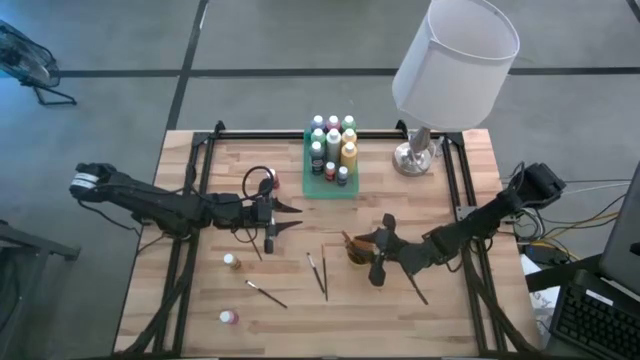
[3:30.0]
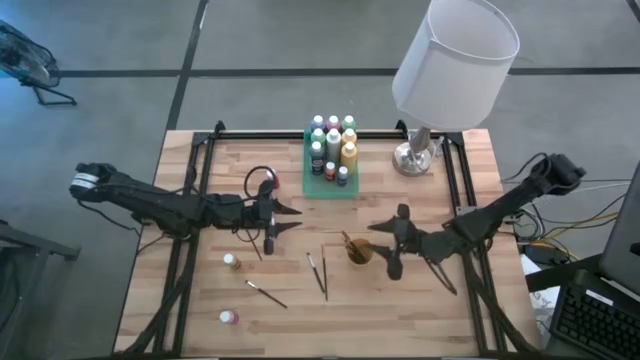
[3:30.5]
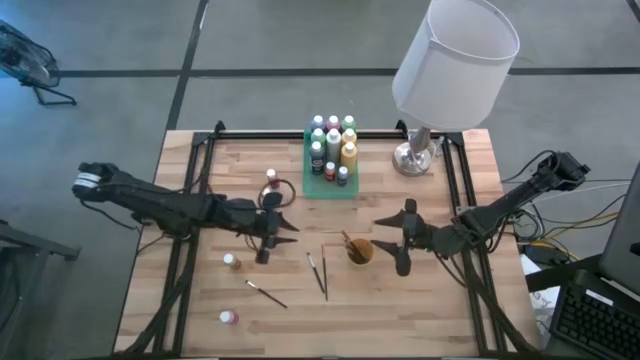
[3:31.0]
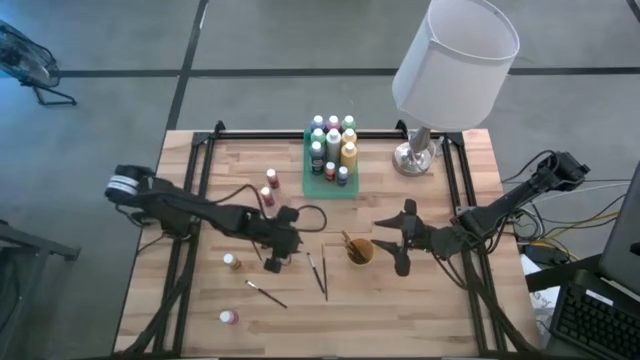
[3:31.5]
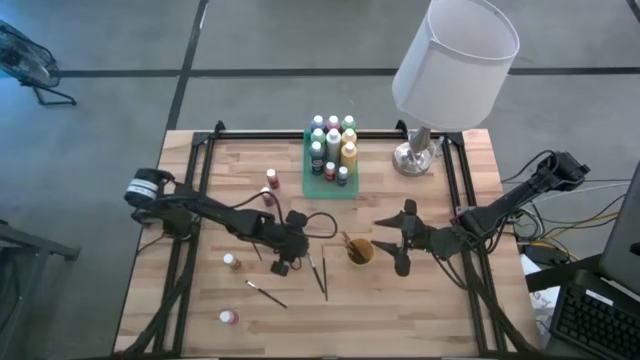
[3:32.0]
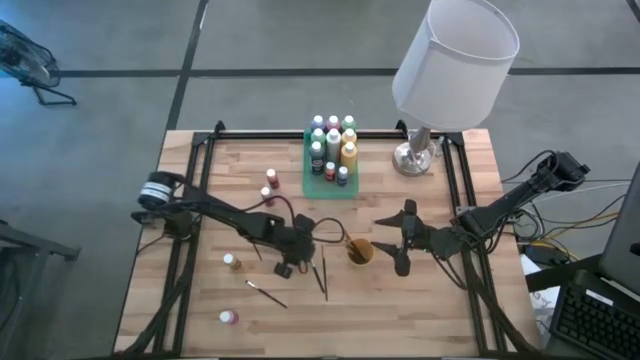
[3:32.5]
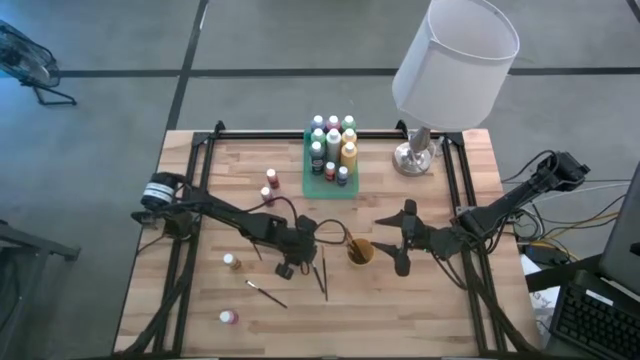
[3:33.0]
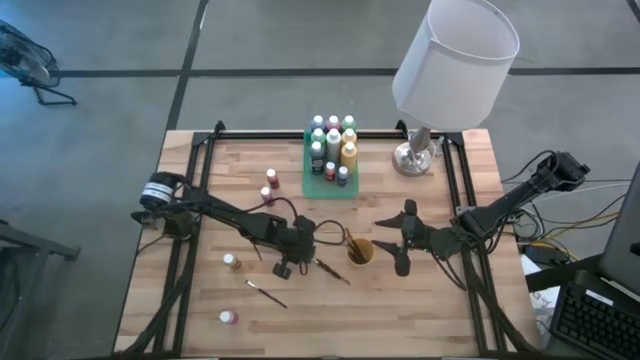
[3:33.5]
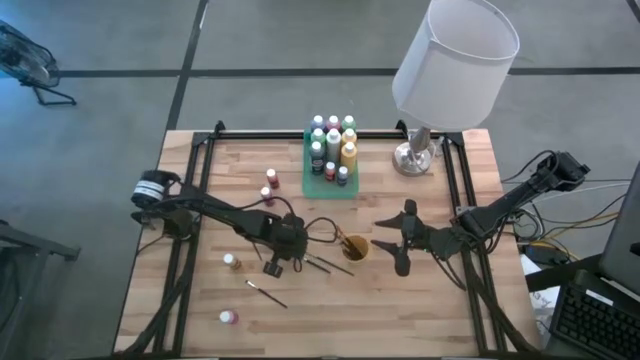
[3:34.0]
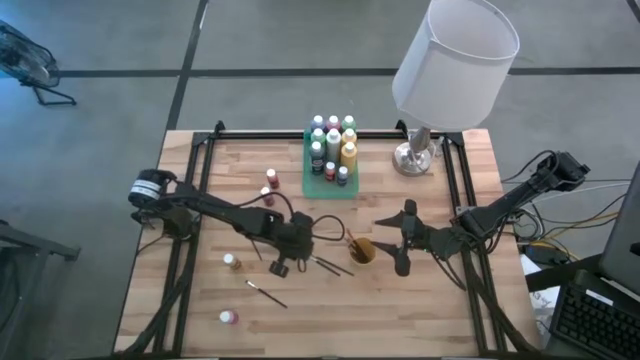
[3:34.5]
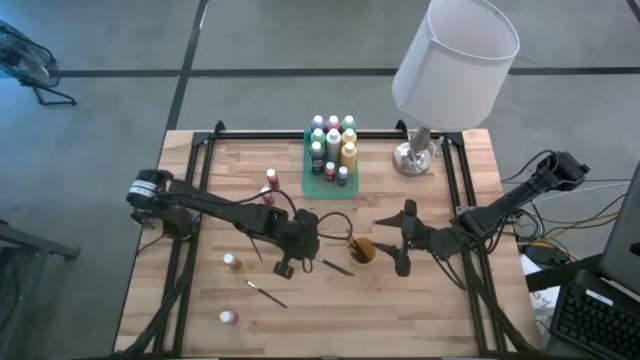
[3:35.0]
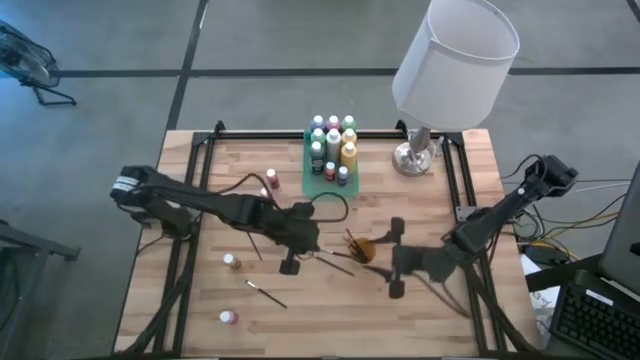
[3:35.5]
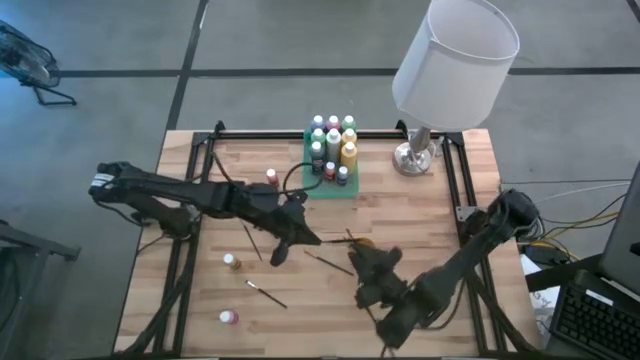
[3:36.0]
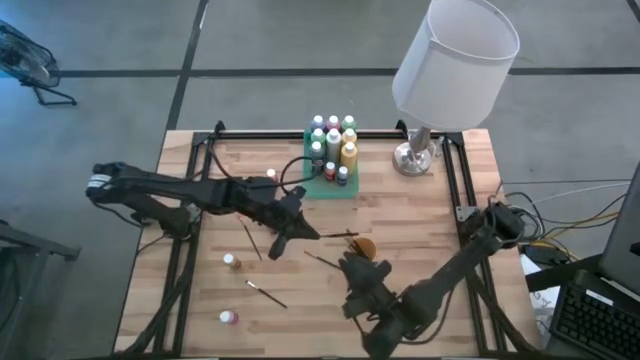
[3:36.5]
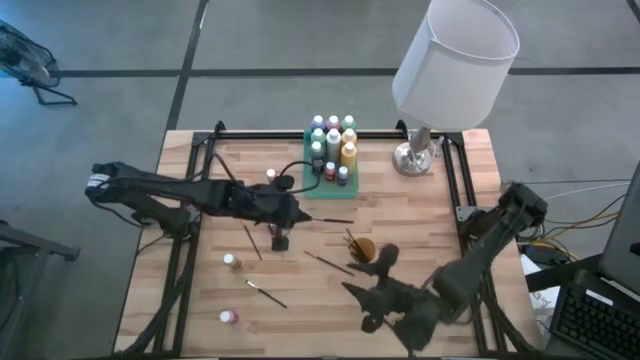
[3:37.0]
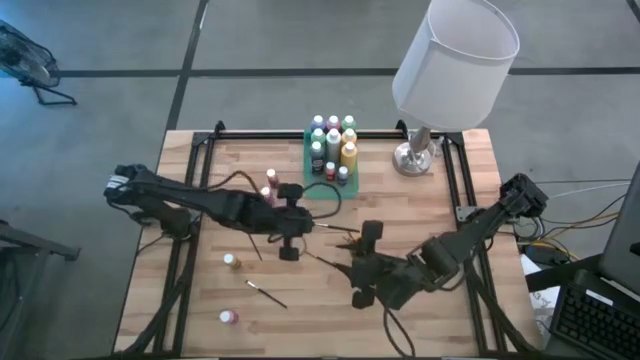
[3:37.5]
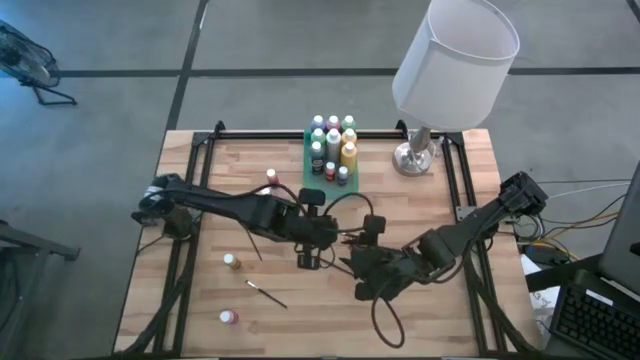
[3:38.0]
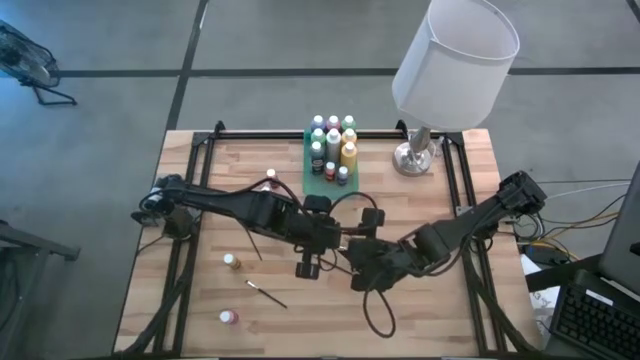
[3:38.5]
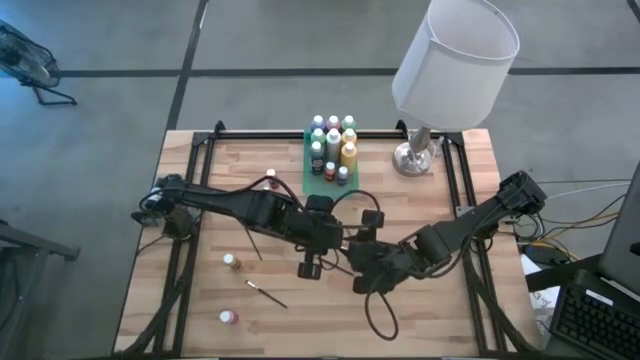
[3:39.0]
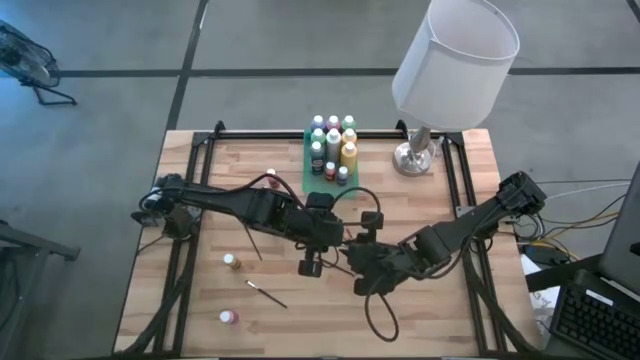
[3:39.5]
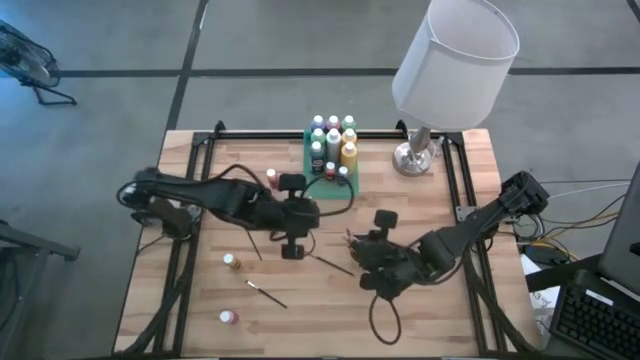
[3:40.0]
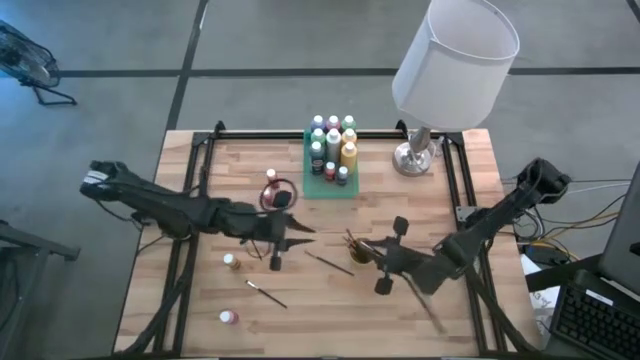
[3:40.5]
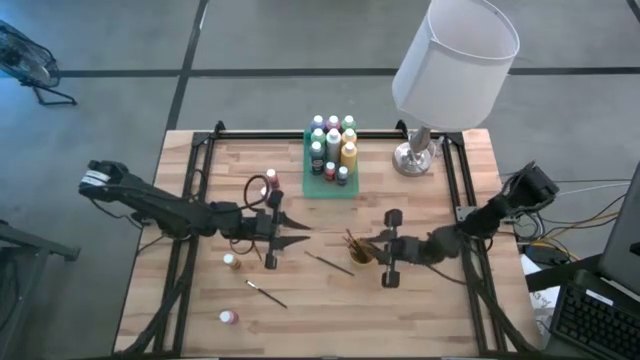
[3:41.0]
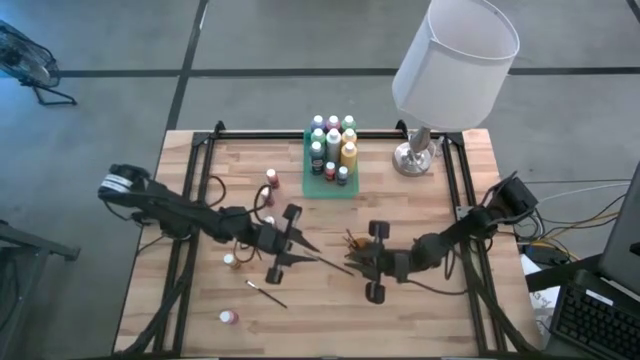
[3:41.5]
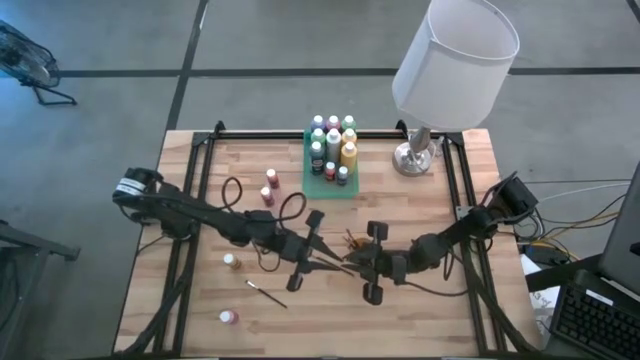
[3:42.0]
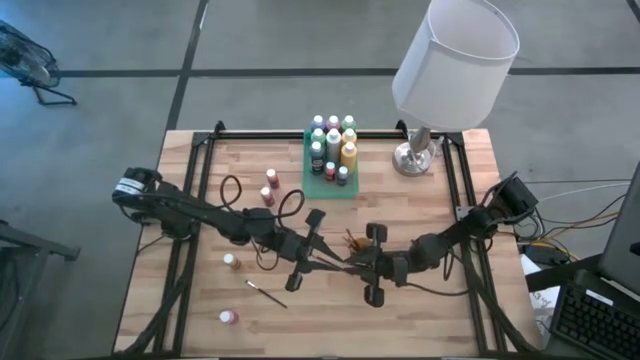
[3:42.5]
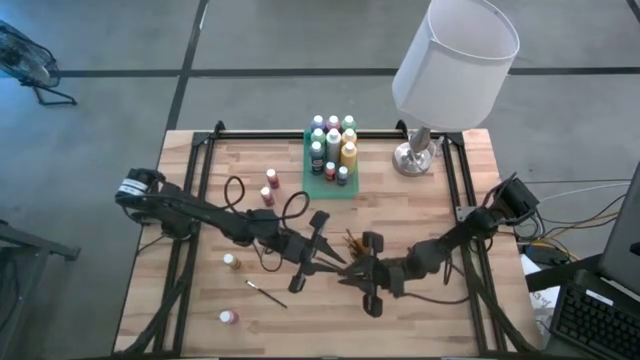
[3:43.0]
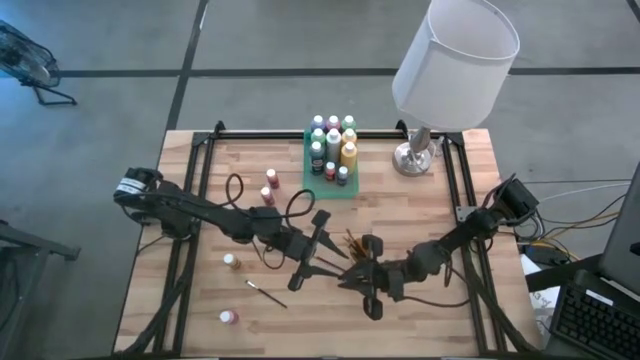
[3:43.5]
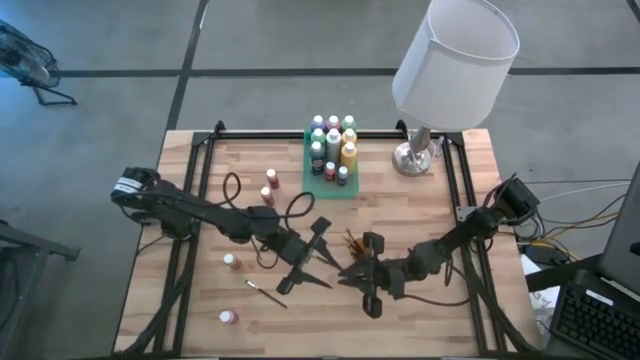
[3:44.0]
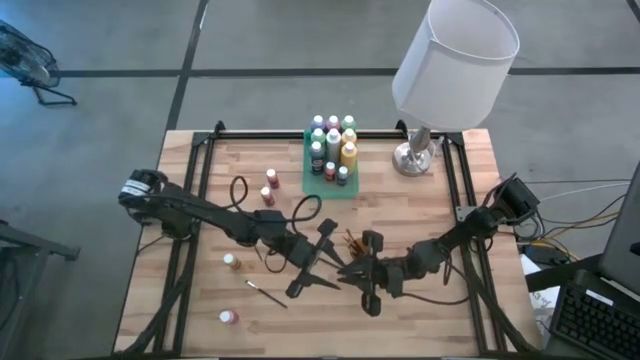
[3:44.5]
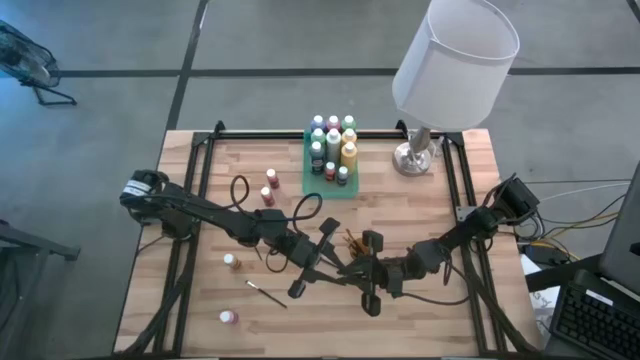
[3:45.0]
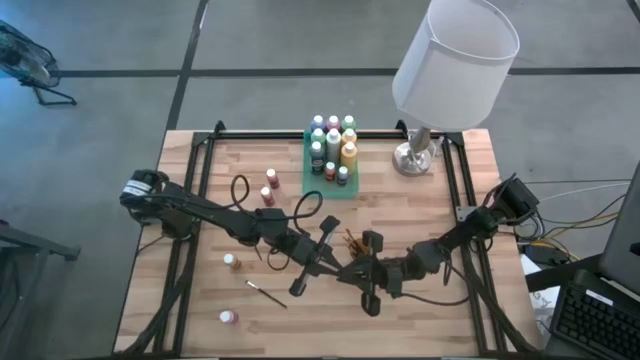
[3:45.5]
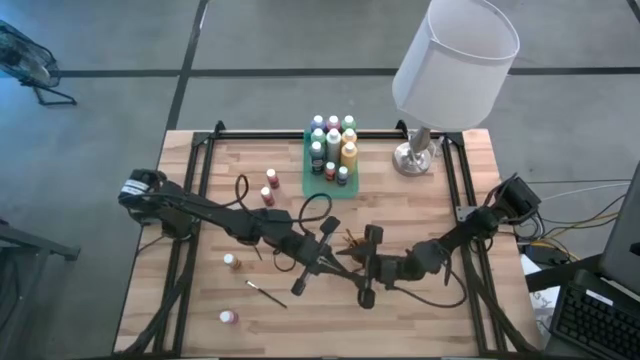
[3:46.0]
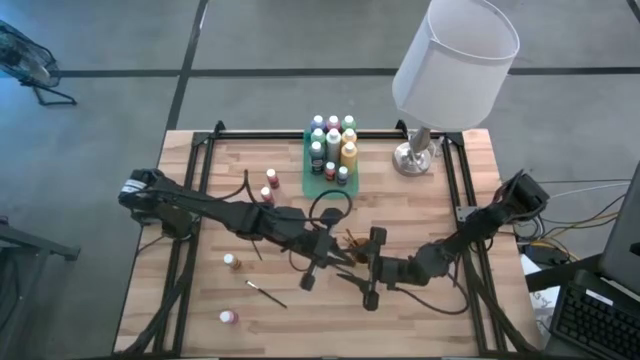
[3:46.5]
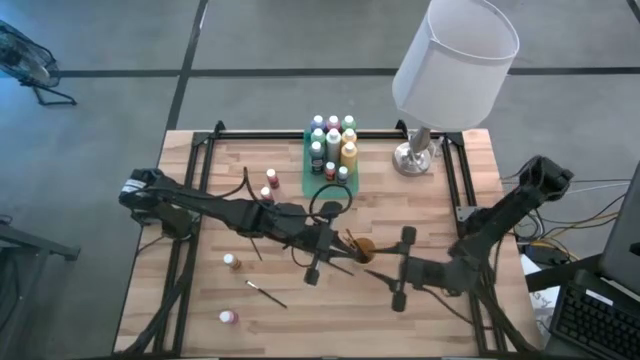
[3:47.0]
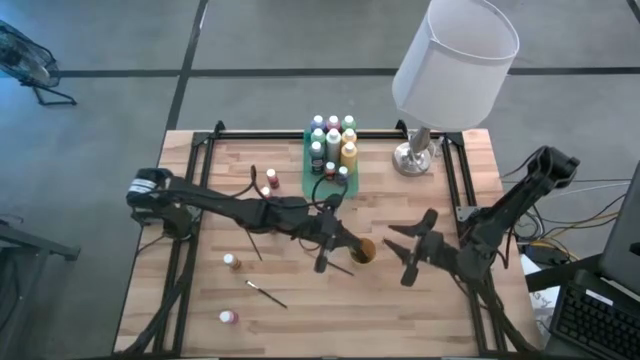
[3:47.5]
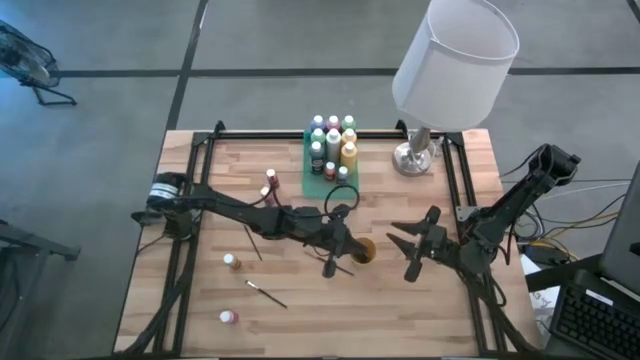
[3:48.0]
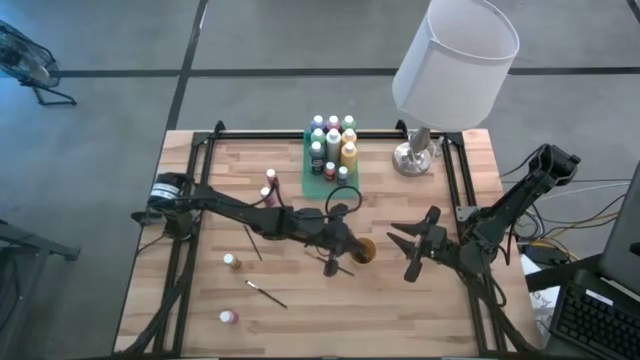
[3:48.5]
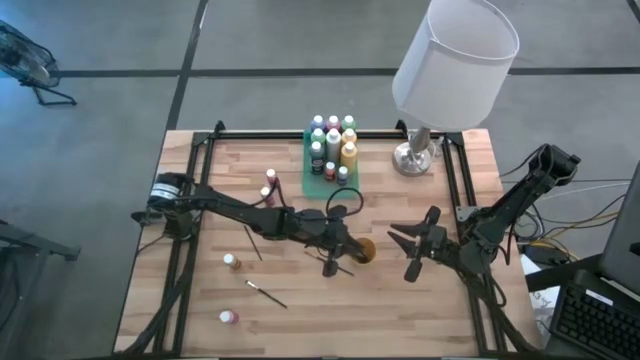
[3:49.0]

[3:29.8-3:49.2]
Task: Pick & Place Paint Supplies
Put the silver paintbrush into the yellow cup

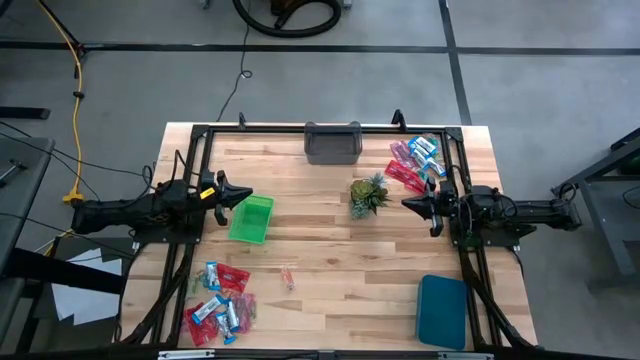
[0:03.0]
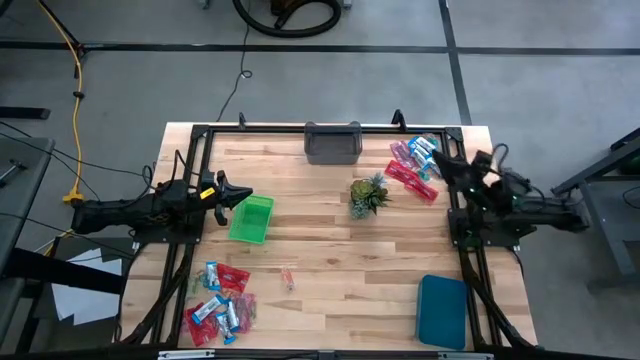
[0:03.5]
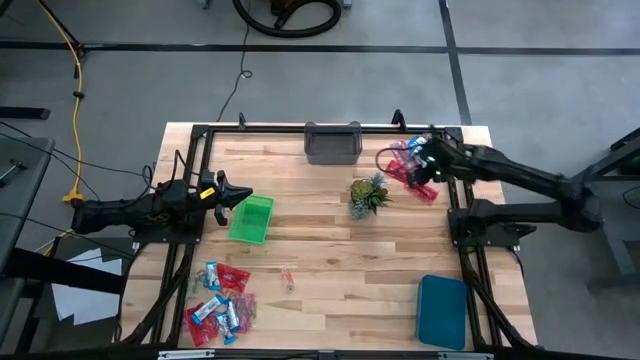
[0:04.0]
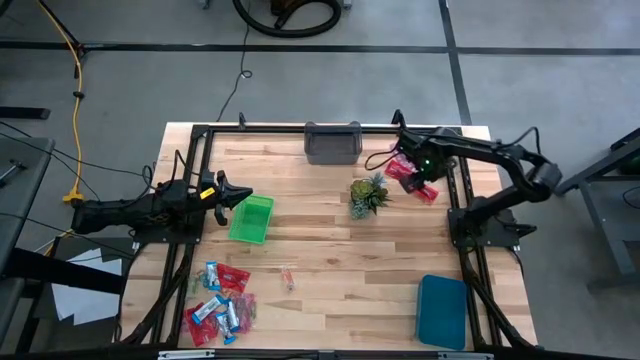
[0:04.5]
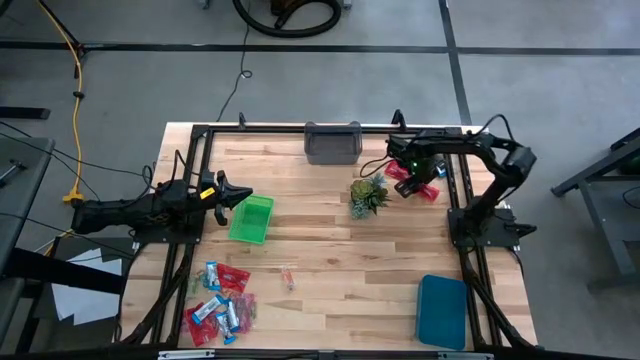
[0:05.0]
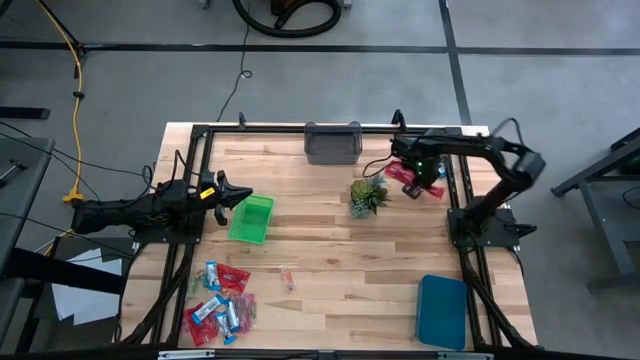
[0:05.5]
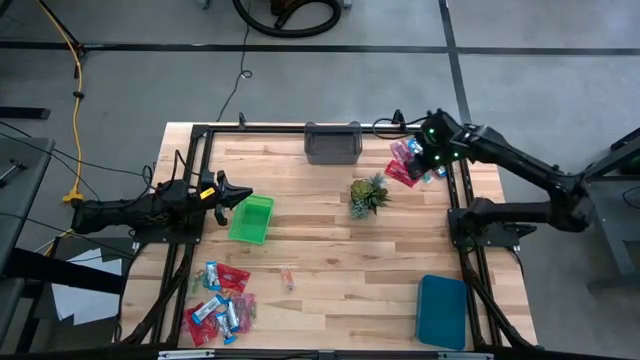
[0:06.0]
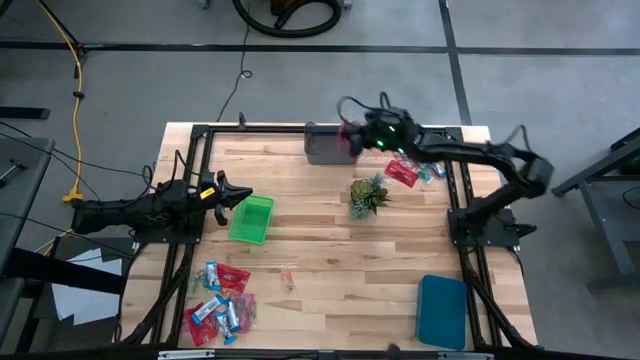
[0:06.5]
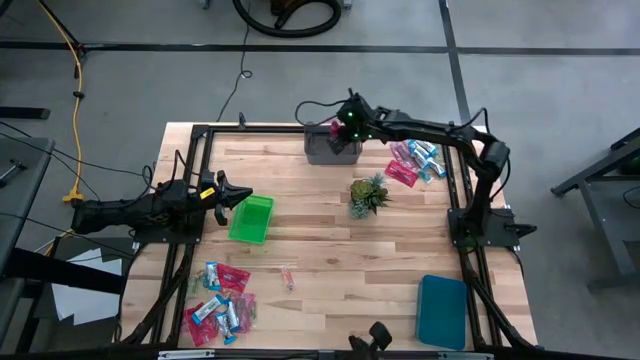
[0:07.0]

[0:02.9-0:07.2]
Task: Sort candy
Put the red candy into the black transparent bin
